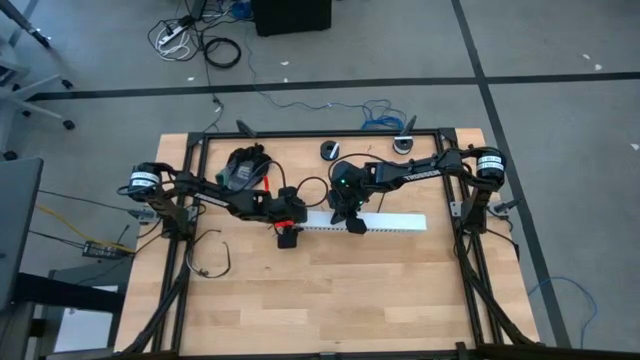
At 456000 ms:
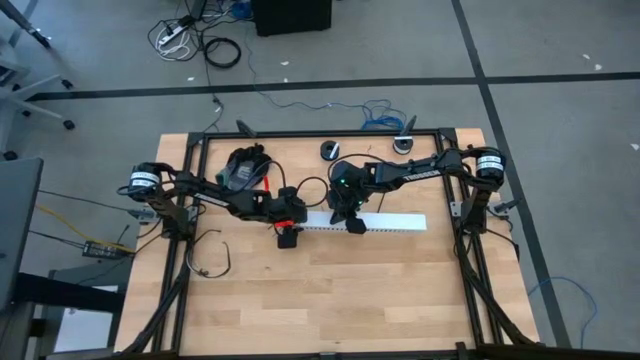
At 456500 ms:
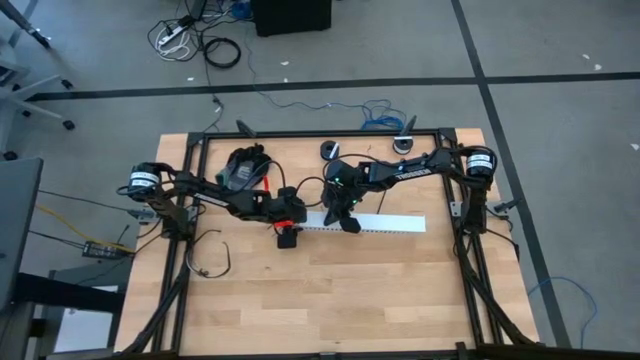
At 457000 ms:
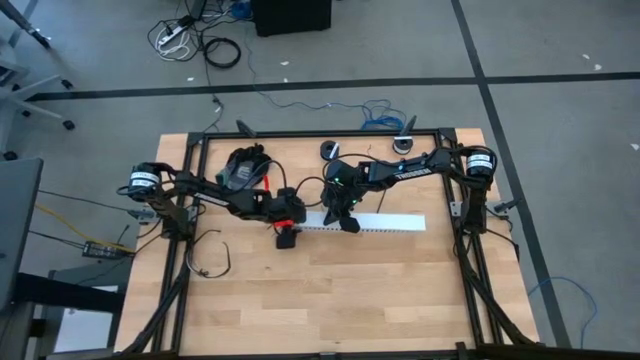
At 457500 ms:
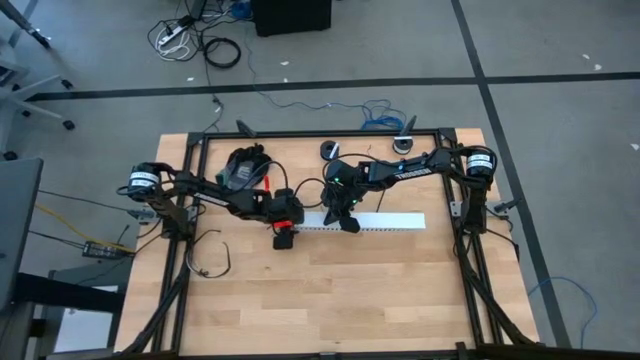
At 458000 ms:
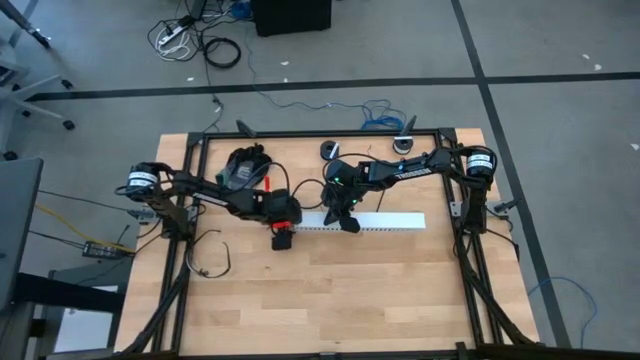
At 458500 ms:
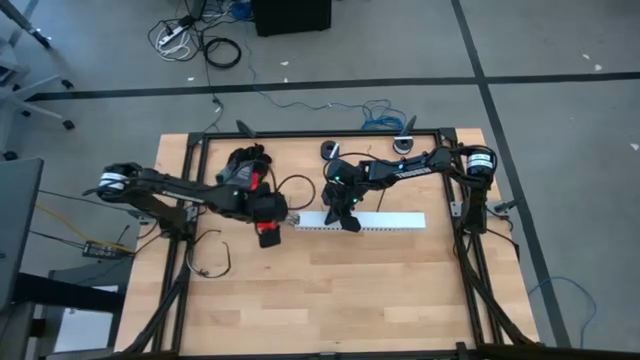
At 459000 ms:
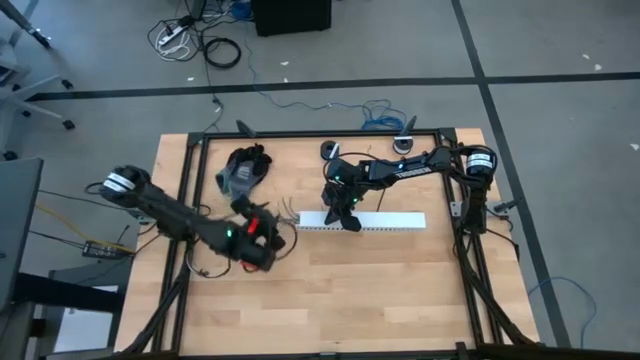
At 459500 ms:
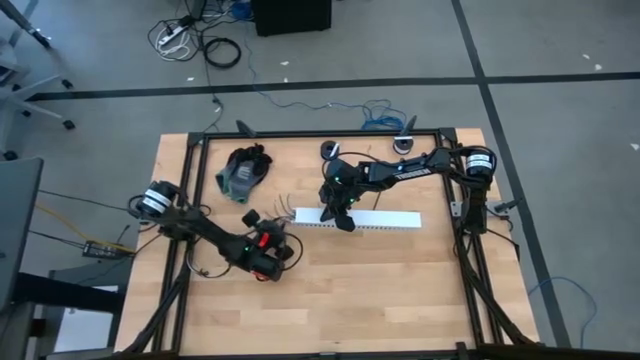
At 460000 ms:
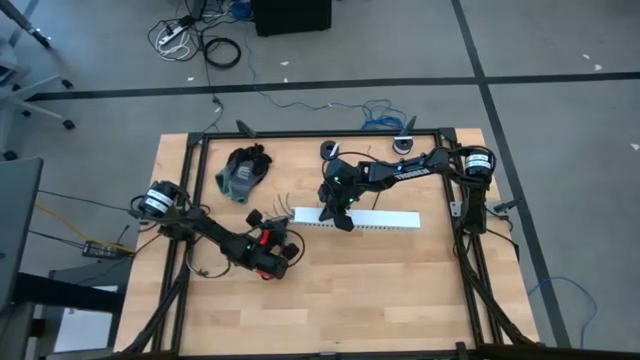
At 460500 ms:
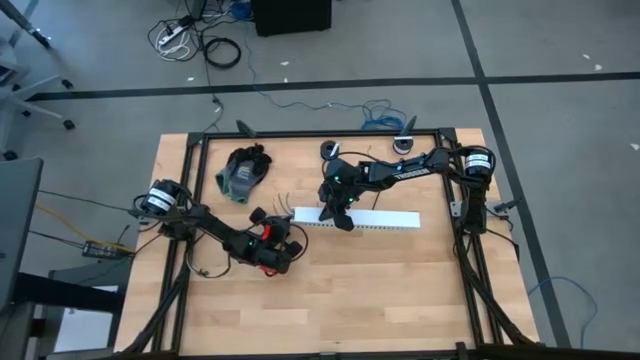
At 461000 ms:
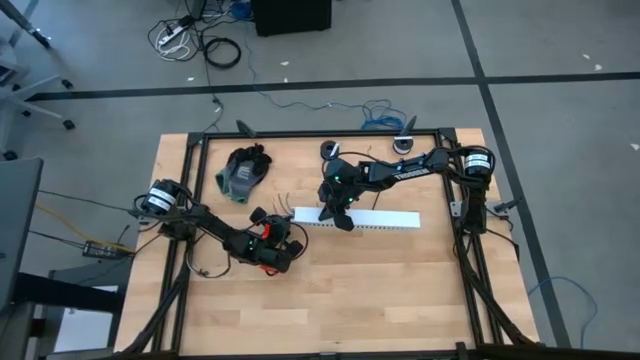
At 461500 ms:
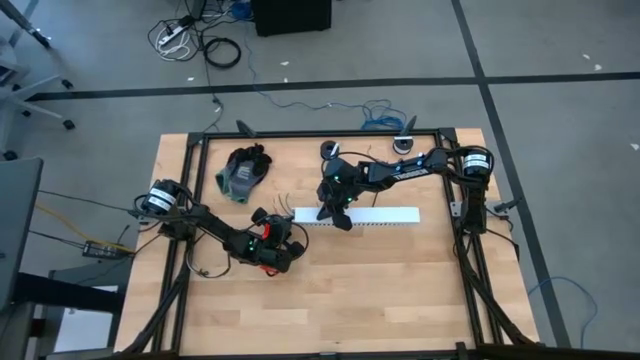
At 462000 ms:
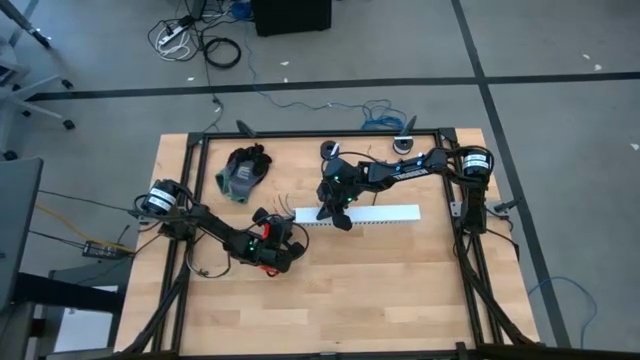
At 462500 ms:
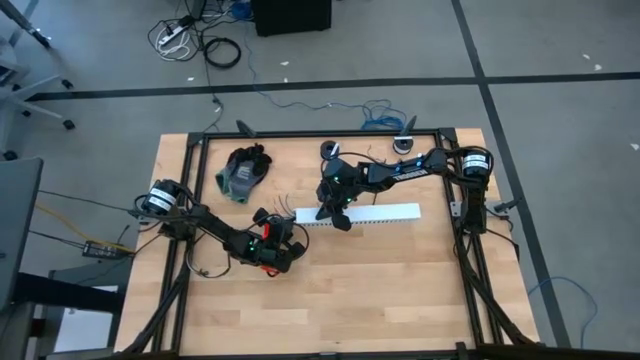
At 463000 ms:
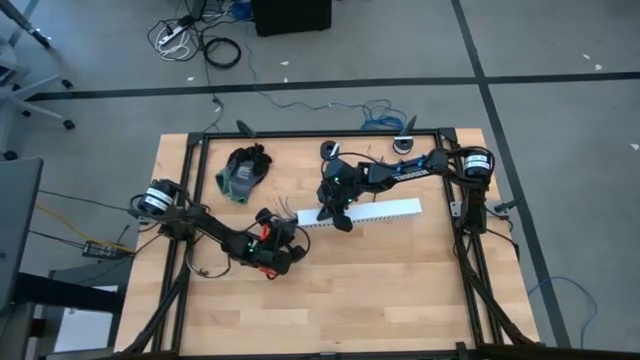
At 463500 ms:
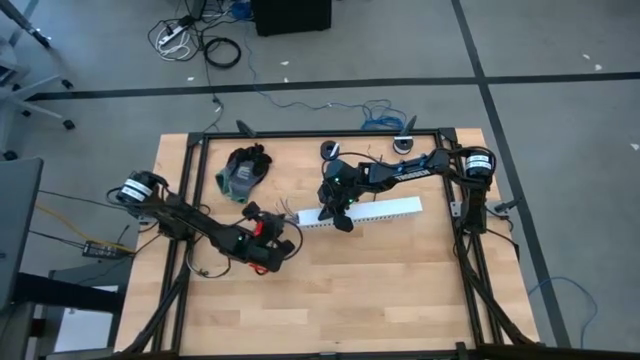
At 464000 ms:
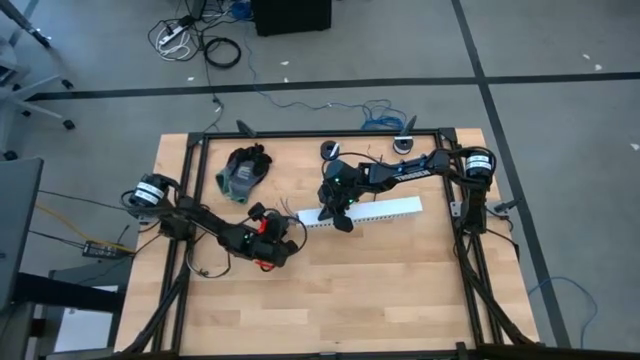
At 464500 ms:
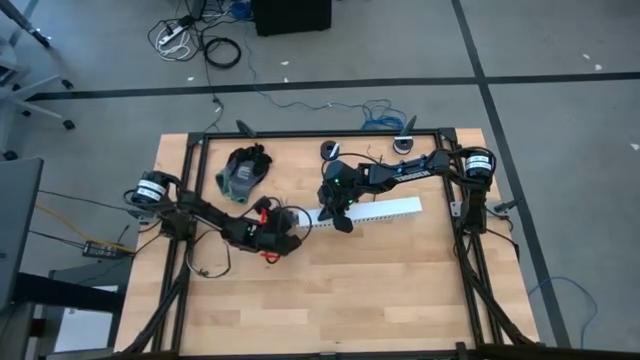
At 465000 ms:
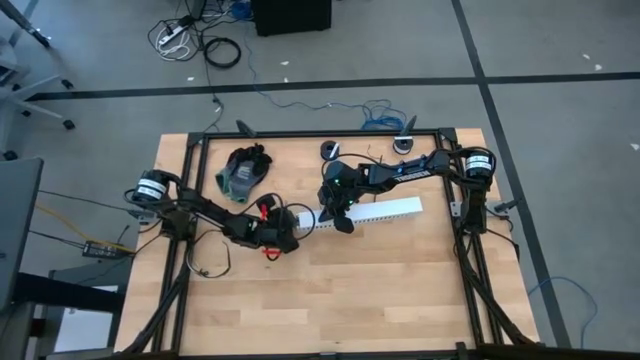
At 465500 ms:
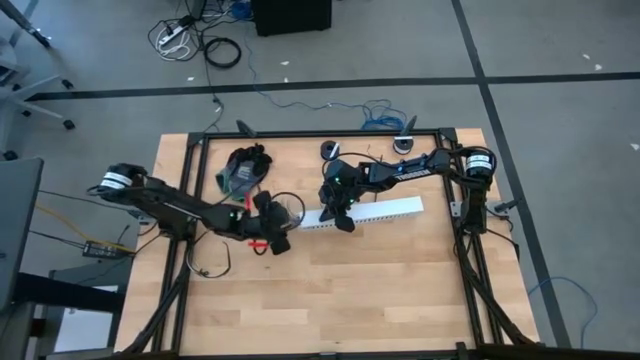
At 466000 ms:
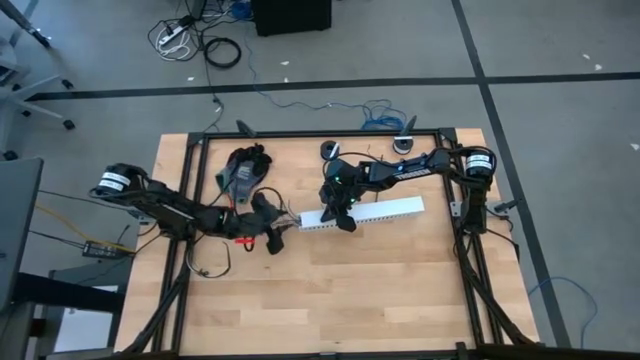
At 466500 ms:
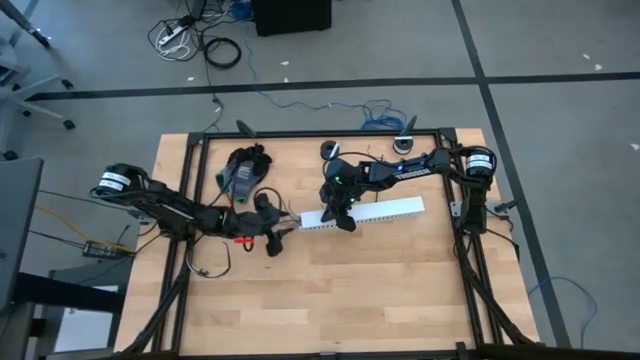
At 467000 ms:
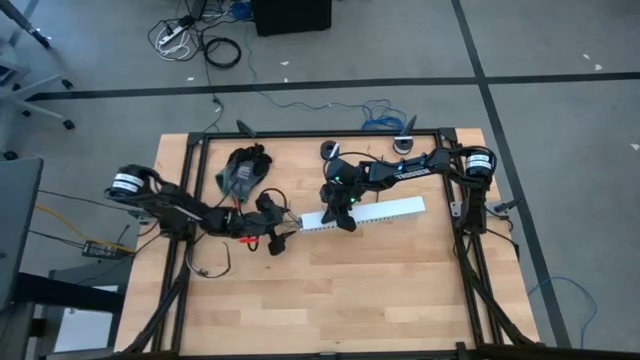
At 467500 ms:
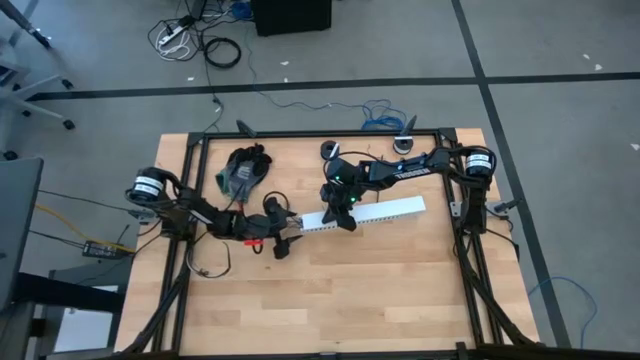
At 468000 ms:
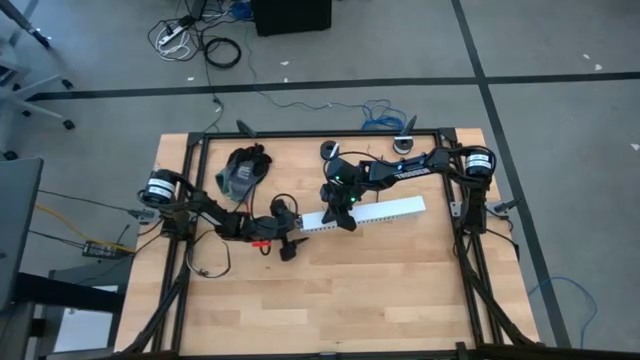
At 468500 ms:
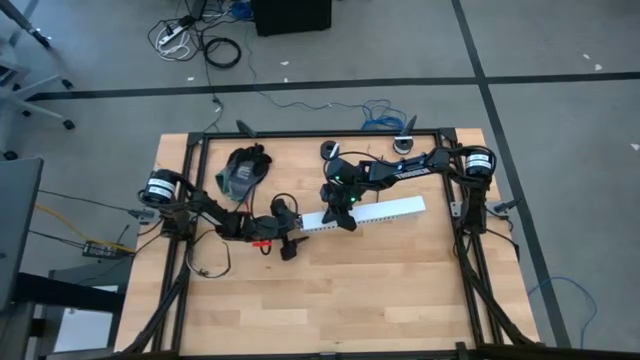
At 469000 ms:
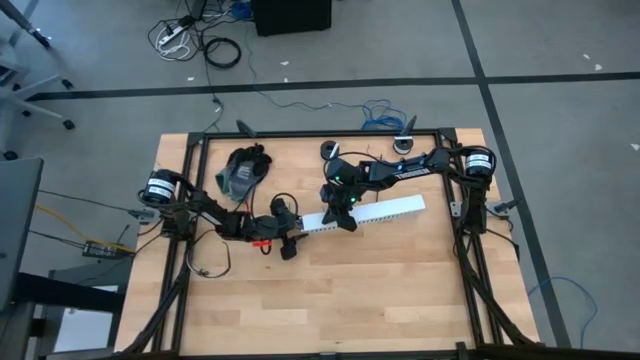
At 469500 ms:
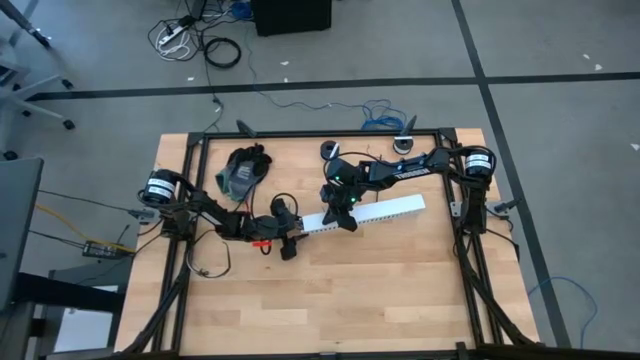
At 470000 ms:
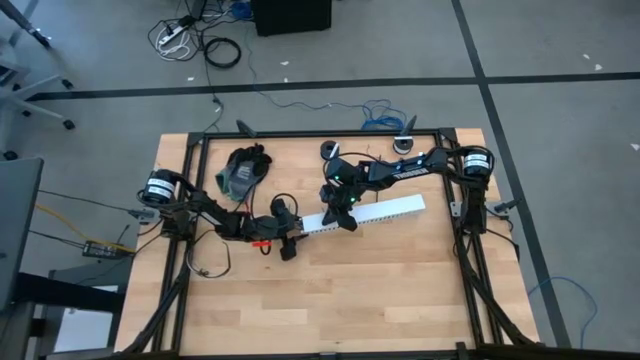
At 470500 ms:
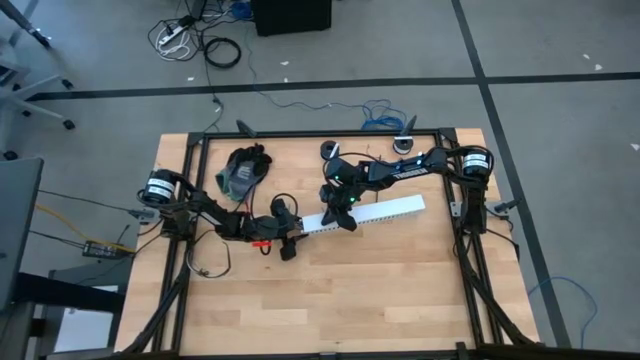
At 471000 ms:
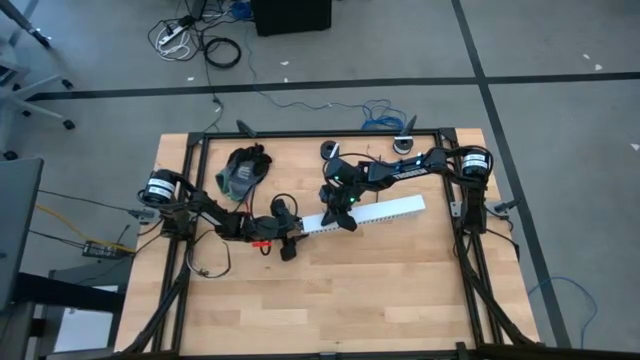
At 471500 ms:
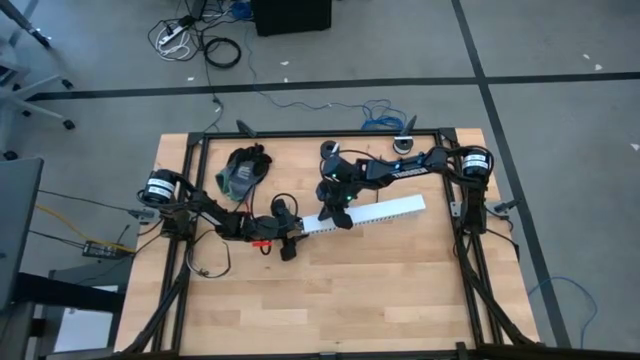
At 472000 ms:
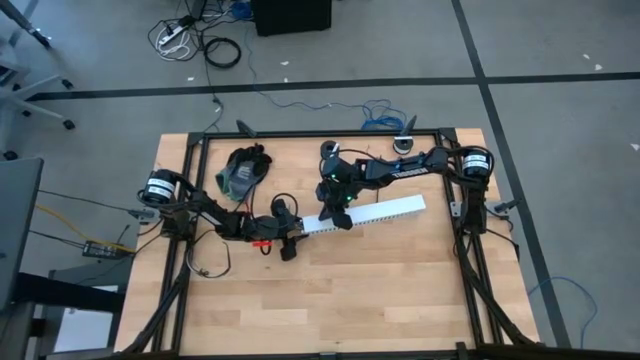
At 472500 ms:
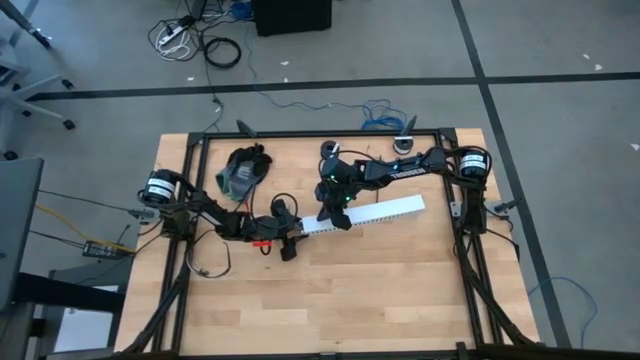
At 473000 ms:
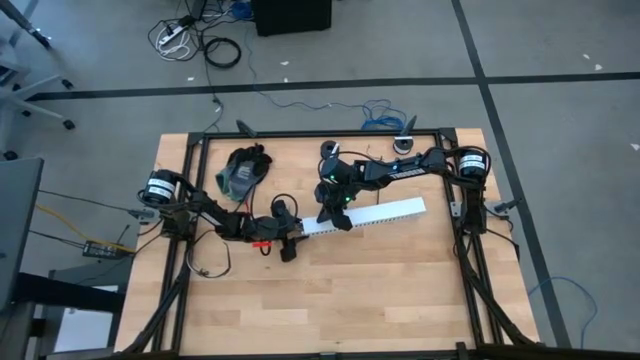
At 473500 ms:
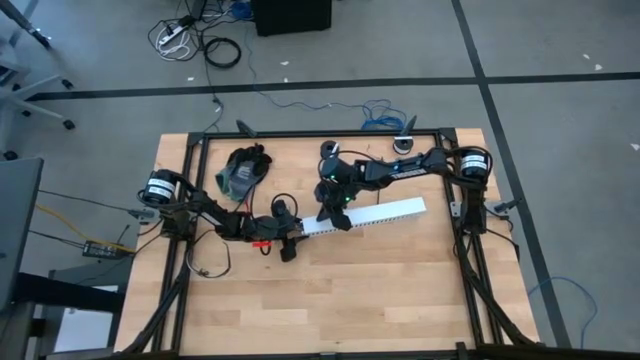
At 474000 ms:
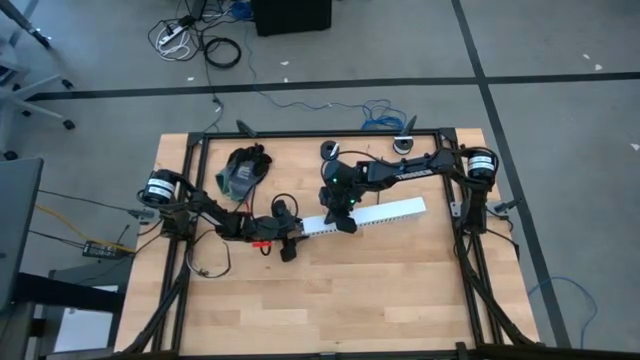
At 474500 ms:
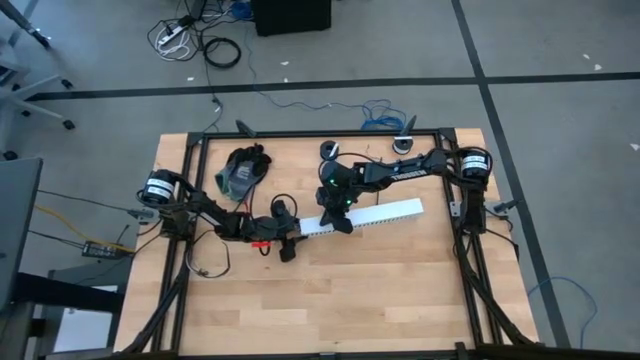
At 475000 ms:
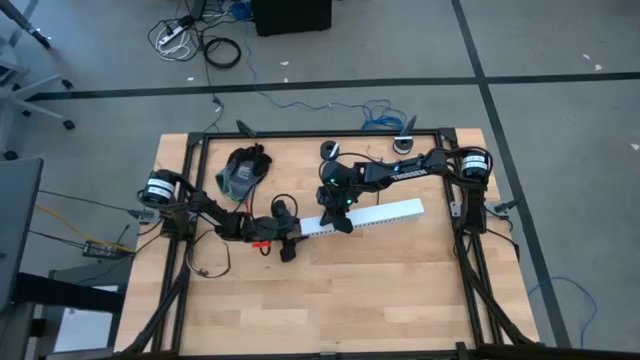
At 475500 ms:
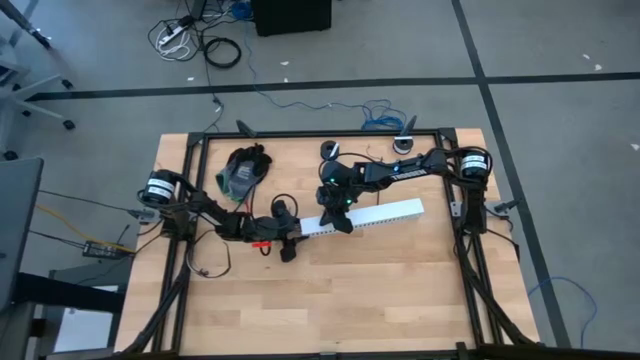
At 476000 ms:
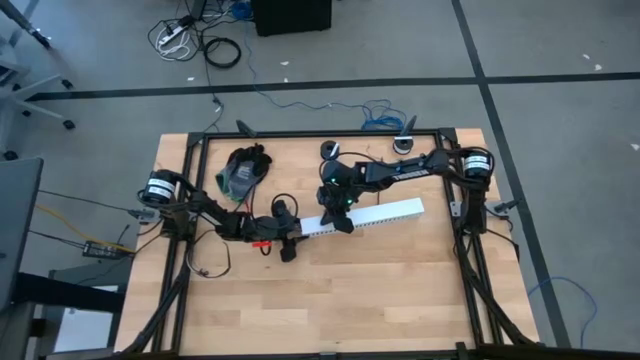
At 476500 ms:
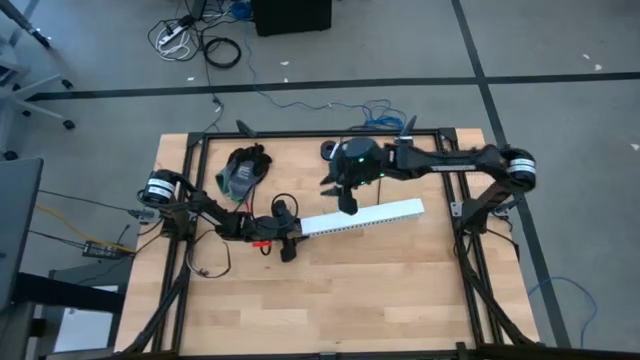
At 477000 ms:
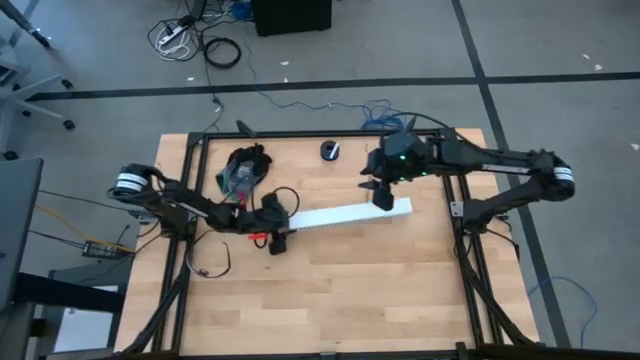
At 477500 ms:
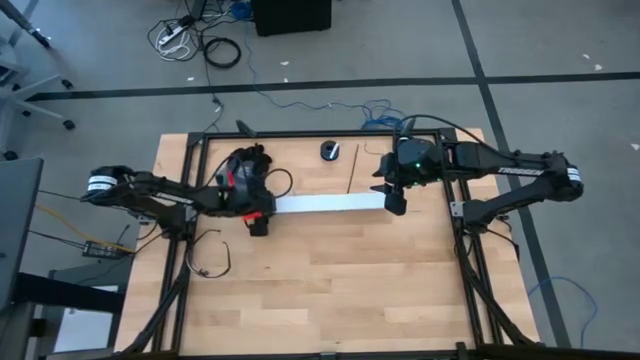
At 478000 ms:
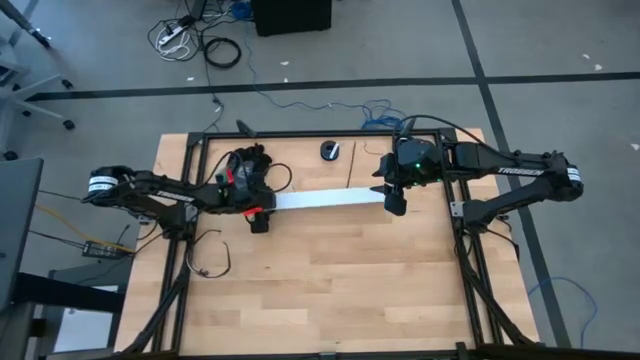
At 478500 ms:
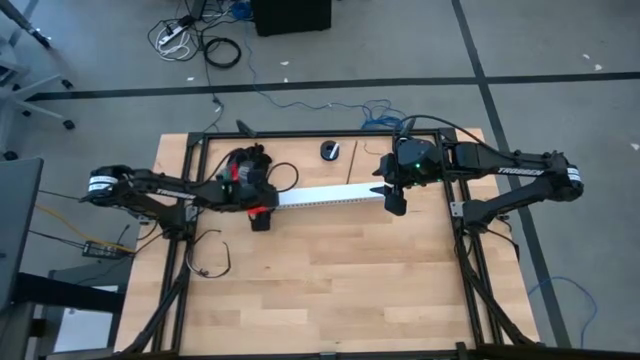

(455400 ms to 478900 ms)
Task: Ziptie cables
Close the white cable duct
